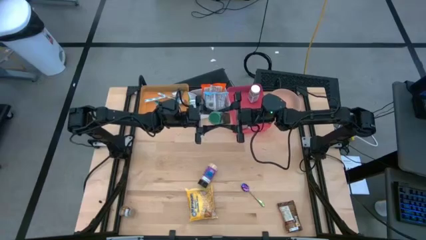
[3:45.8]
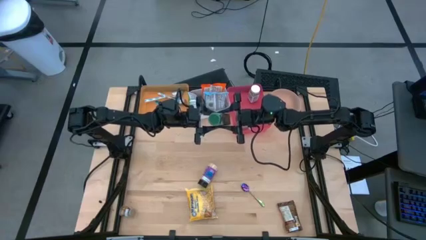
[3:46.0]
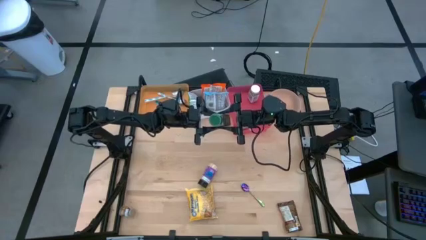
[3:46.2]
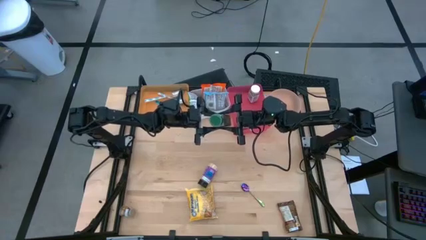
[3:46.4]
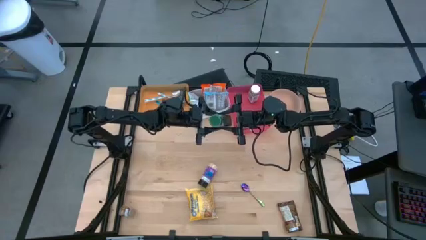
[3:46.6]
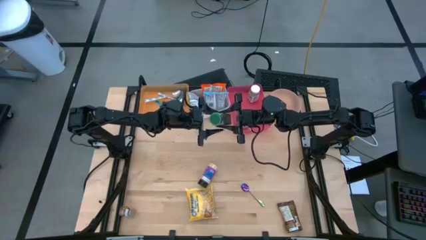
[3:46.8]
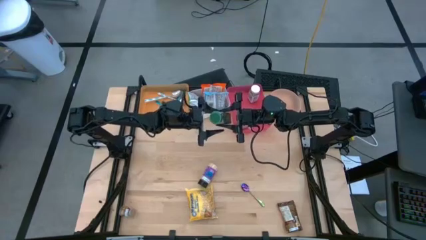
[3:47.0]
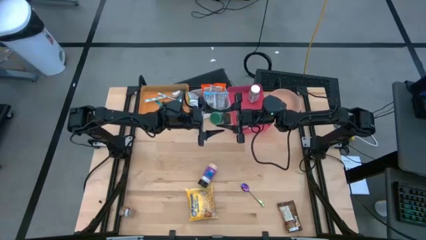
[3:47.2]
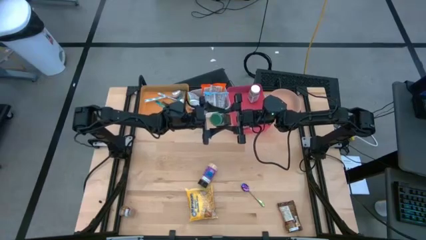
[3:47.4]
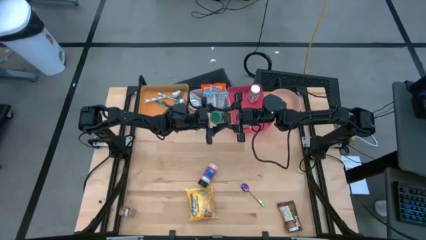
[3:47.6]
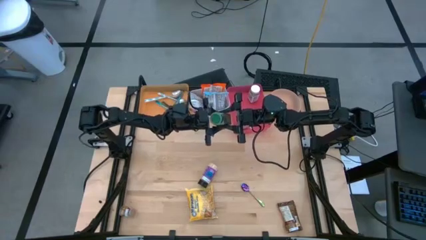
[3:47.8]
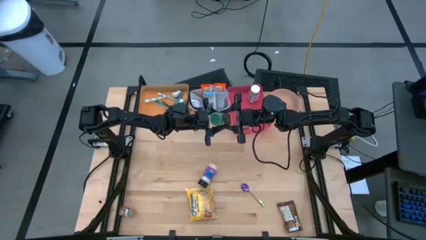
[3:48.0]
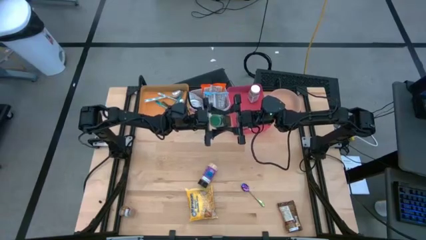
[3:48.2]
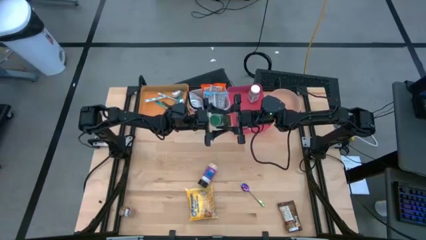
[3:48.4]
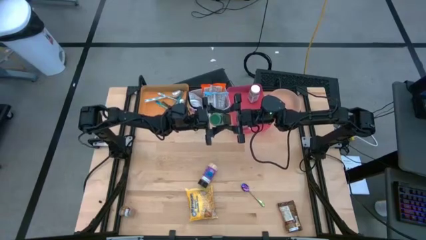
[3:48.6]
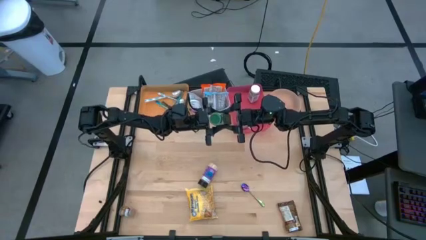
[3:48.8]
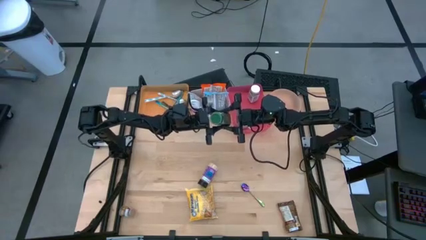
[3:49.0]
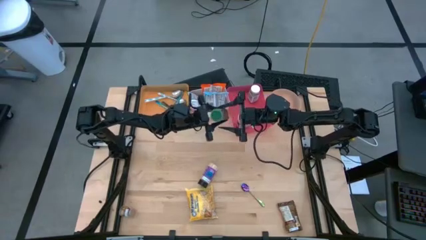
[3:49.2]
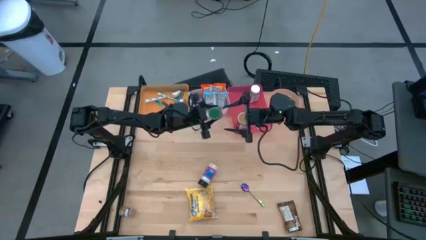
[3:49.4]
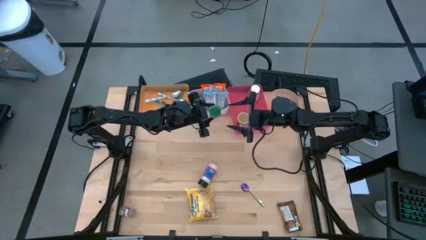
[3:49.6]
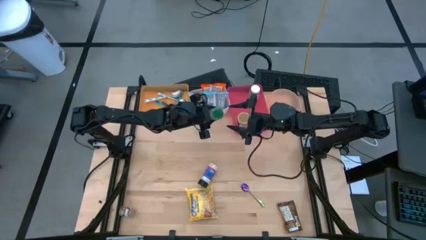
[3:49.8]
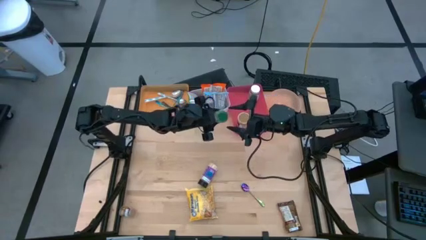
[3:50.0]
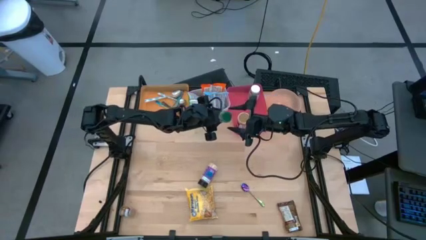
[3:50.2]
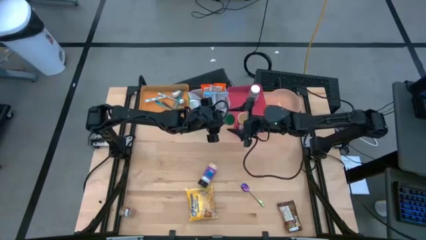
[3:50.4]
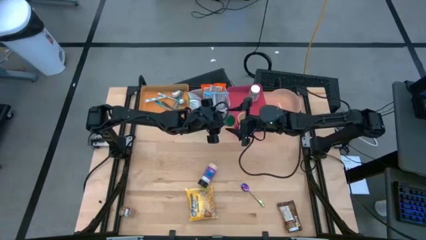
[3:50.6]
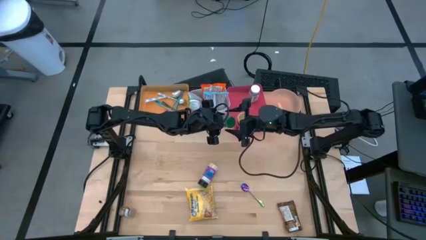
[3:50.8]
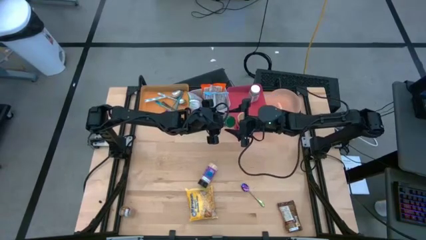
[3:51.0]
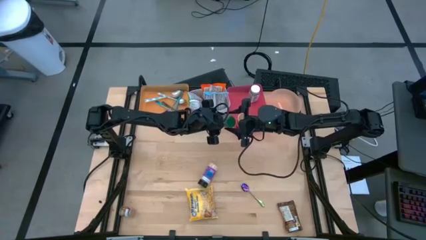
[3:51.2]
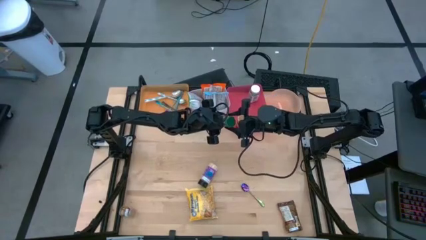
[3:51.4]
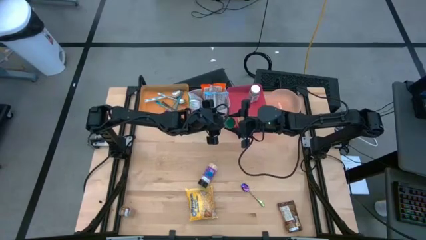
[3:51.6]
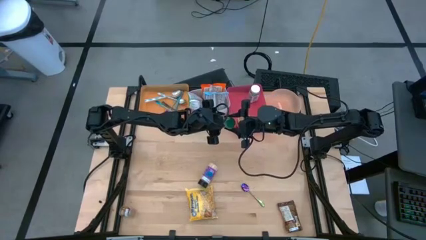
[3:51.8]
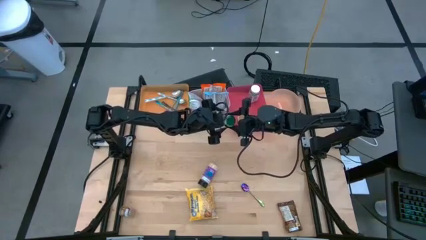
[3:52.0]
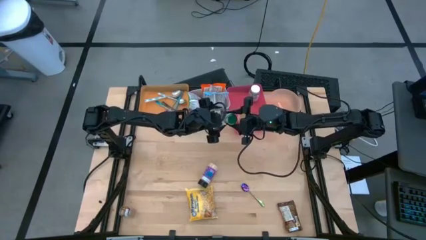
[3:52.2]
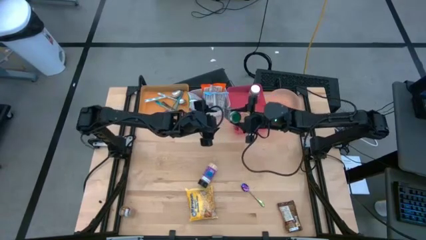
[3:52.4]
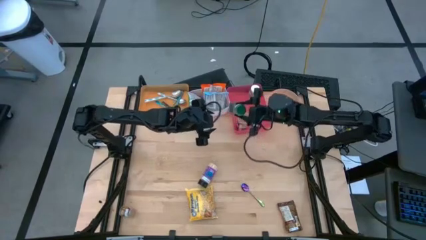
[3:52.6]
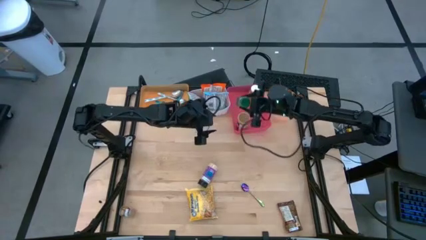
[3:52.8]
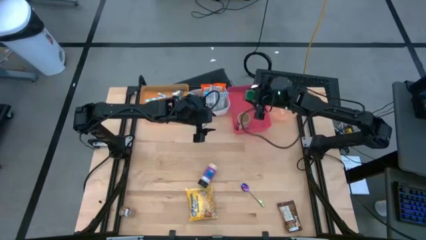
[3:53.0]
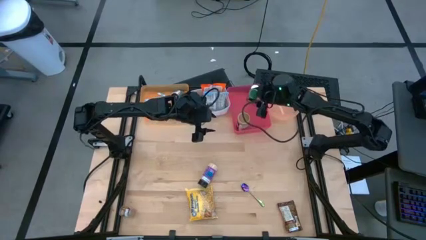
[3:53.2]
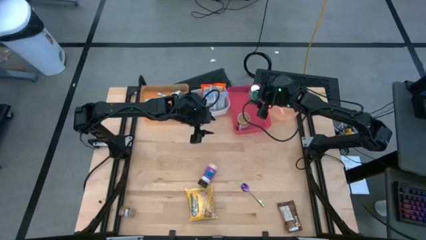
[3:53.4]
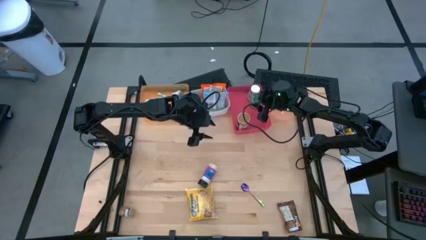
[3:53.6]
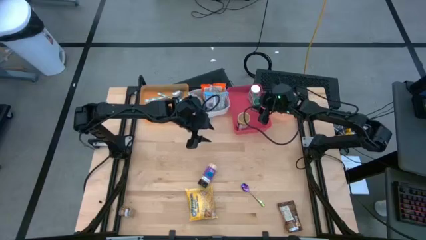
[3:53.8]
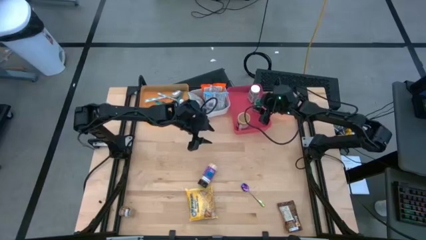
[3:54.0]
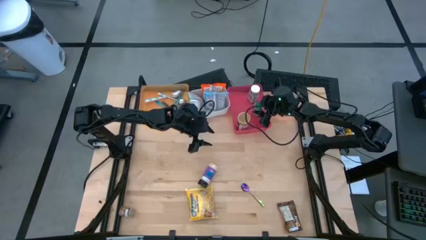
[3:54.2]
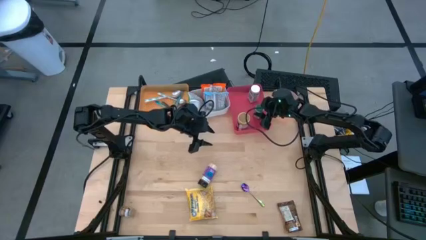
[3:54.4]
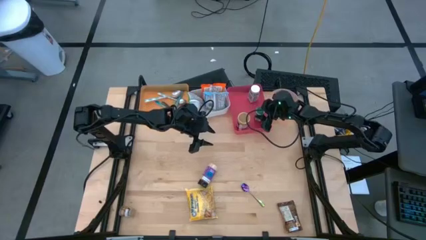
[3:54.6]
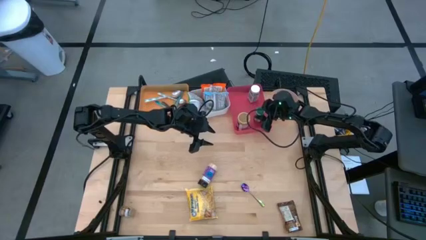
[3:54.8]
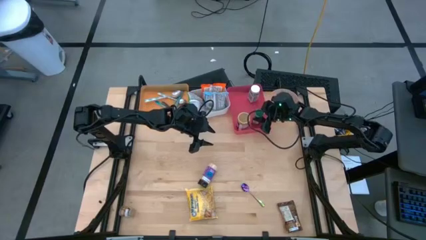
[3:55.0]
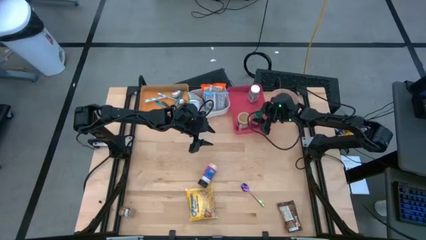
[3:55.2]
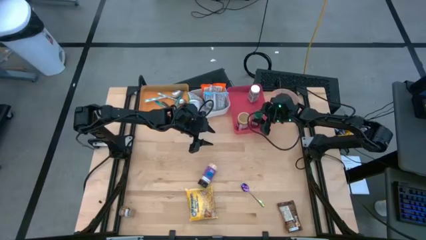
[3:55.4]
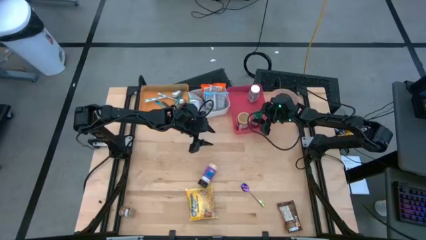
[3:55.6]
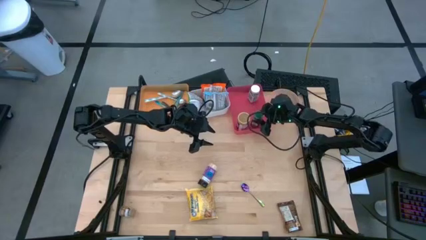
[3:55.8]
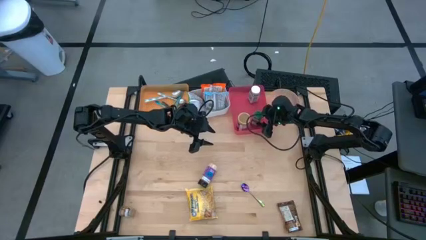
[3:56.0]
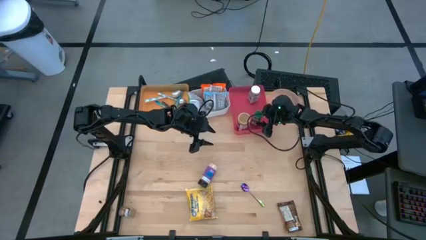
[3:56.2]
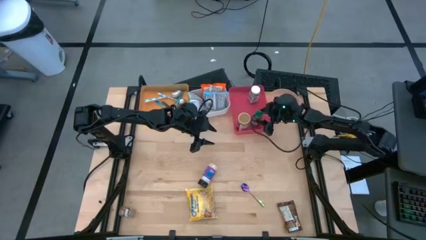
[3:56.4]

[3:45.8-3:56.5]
Task: Pick & Place Food Item
Put the green seasoning bottle into the pink bin
